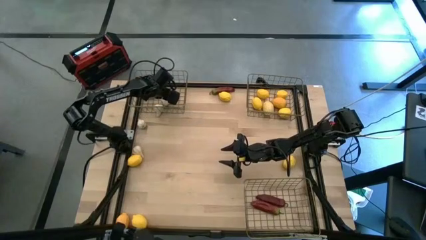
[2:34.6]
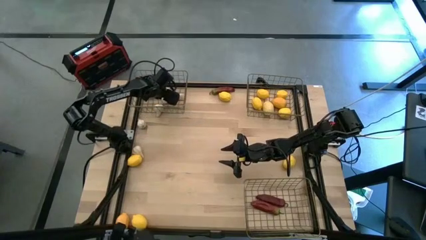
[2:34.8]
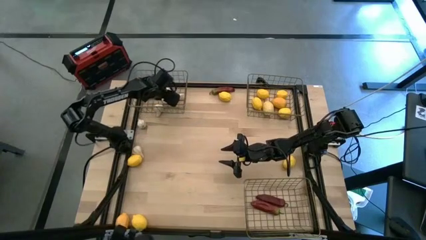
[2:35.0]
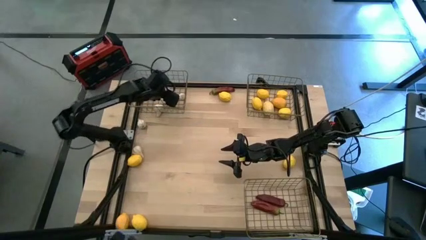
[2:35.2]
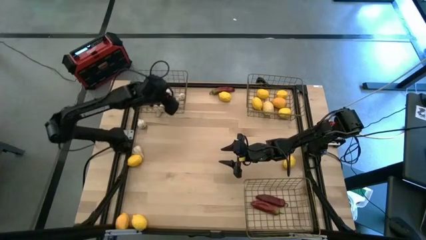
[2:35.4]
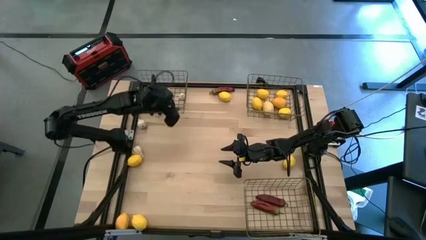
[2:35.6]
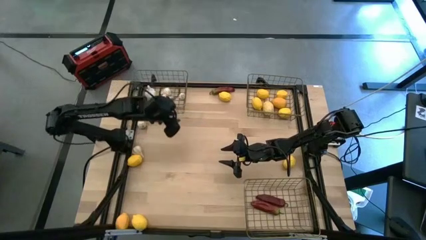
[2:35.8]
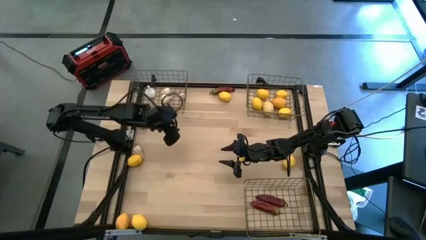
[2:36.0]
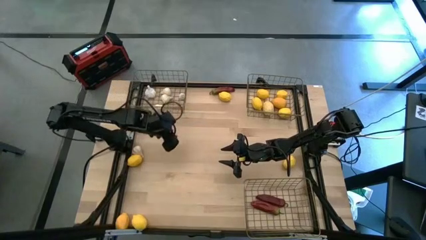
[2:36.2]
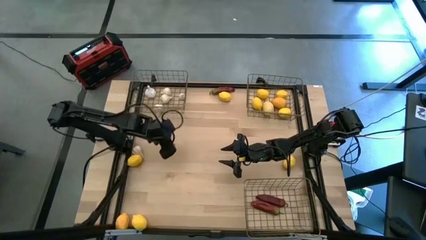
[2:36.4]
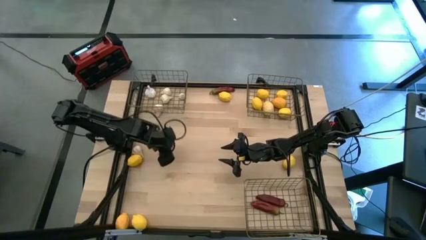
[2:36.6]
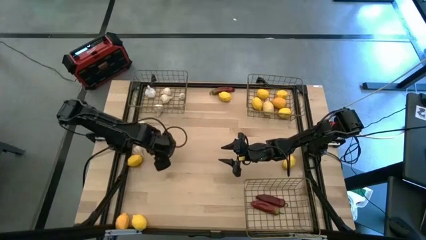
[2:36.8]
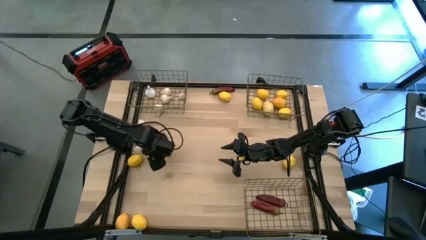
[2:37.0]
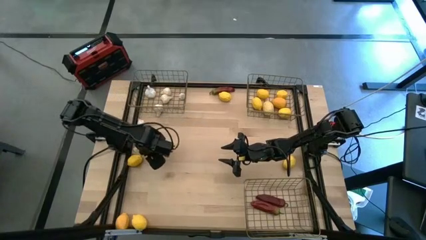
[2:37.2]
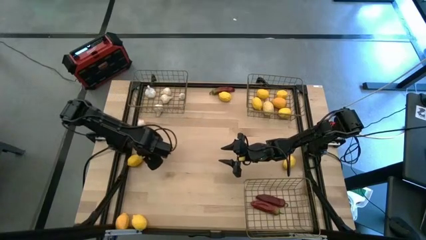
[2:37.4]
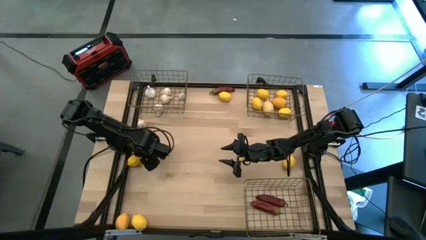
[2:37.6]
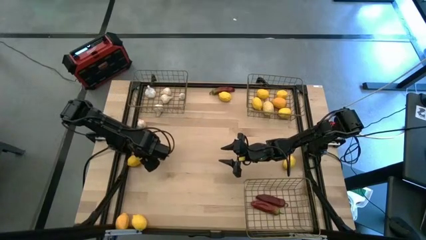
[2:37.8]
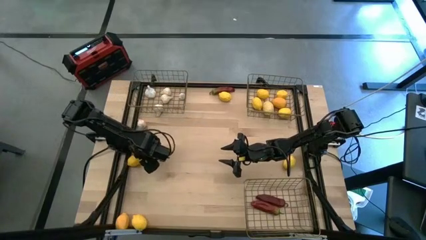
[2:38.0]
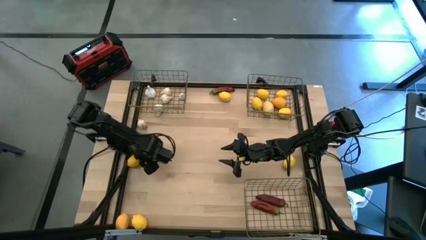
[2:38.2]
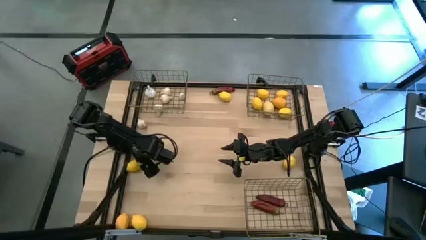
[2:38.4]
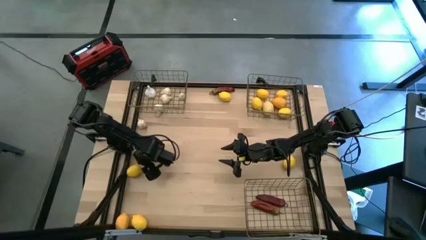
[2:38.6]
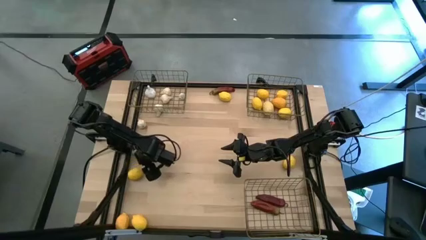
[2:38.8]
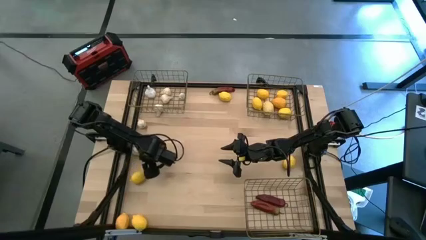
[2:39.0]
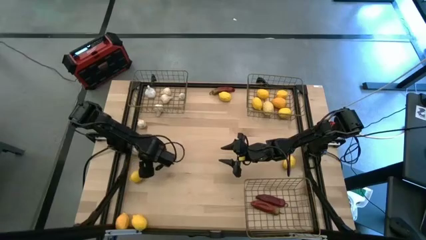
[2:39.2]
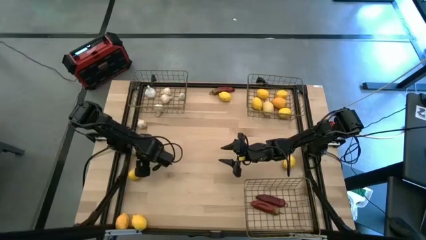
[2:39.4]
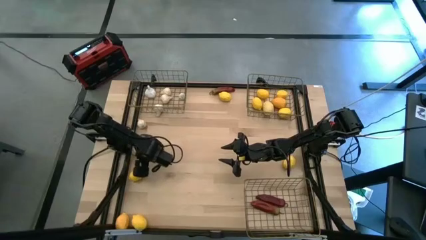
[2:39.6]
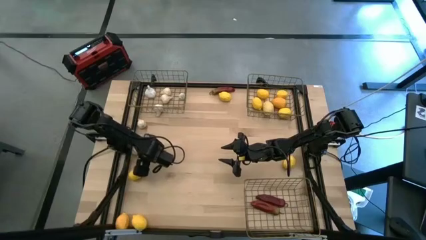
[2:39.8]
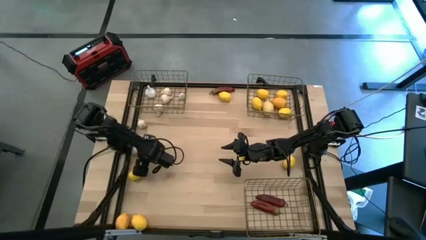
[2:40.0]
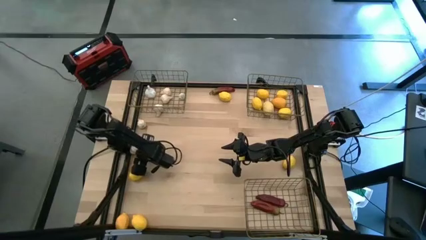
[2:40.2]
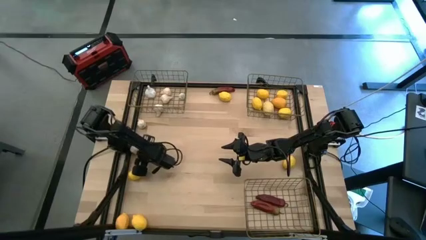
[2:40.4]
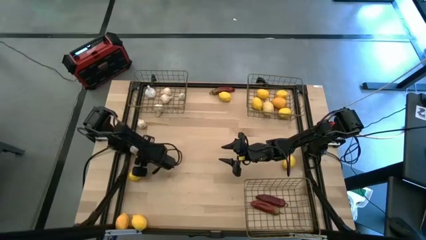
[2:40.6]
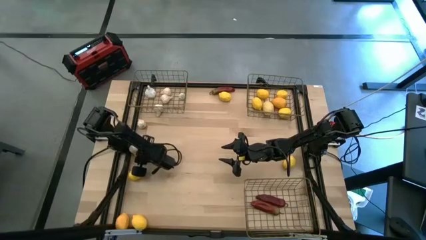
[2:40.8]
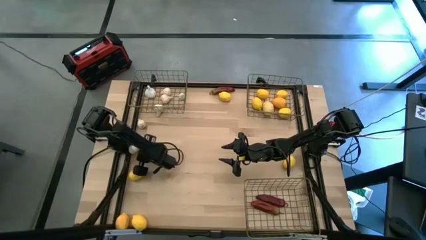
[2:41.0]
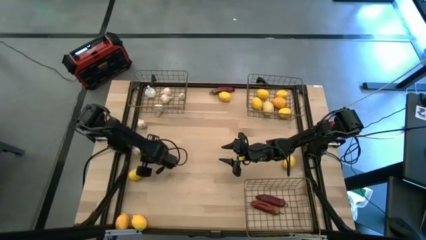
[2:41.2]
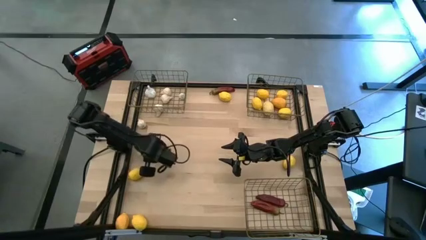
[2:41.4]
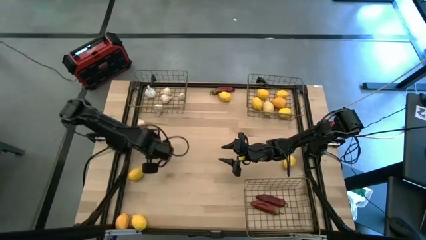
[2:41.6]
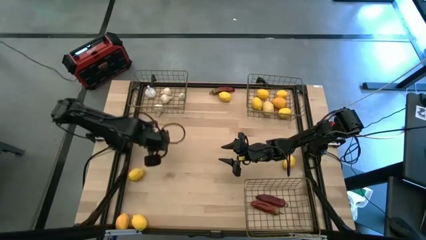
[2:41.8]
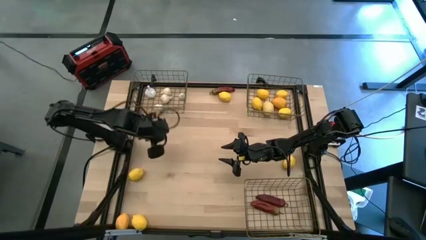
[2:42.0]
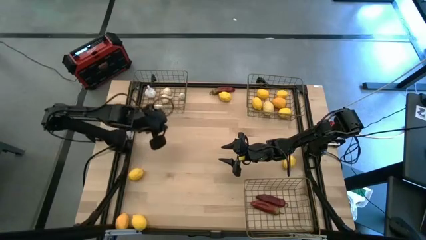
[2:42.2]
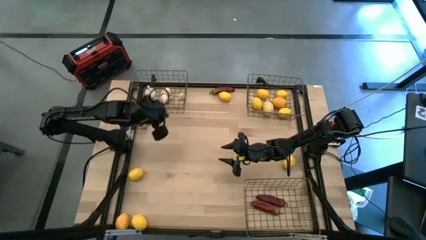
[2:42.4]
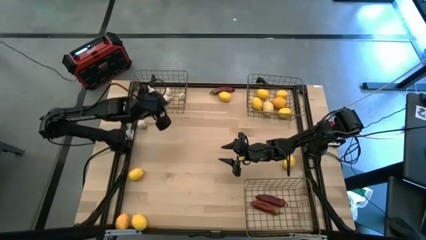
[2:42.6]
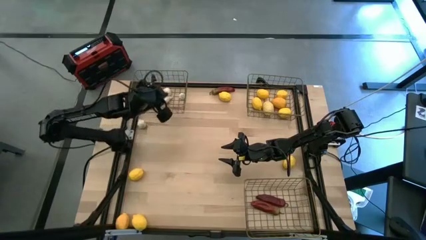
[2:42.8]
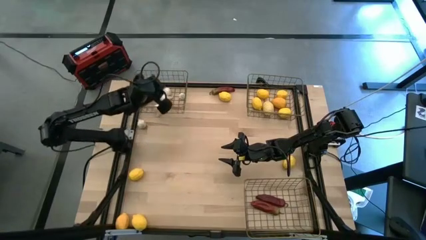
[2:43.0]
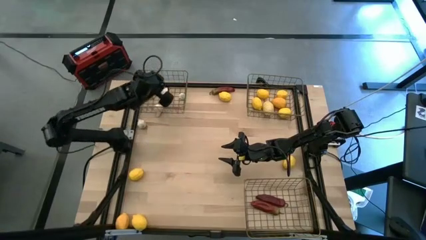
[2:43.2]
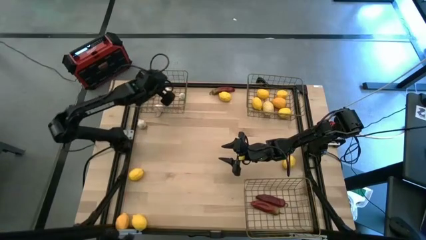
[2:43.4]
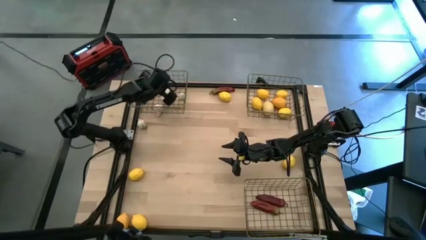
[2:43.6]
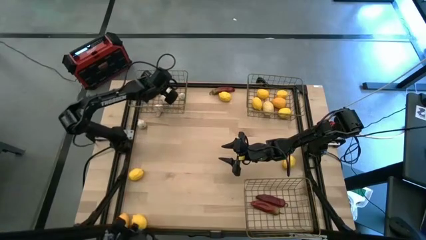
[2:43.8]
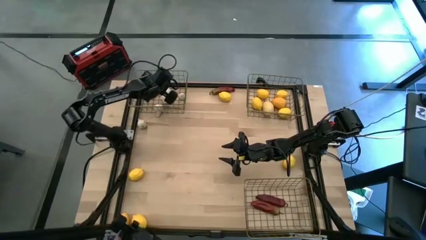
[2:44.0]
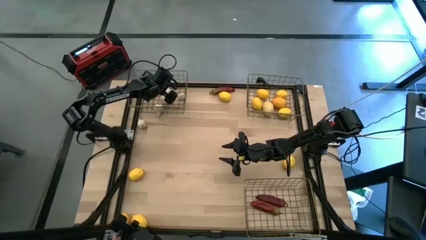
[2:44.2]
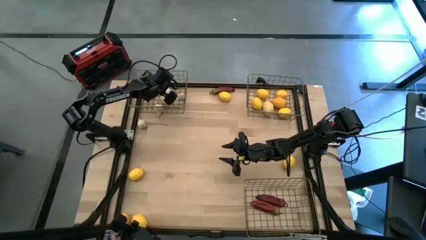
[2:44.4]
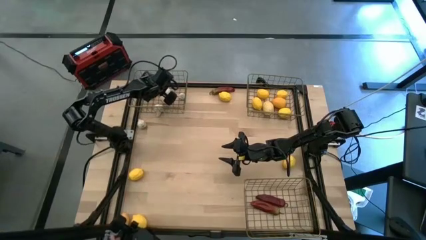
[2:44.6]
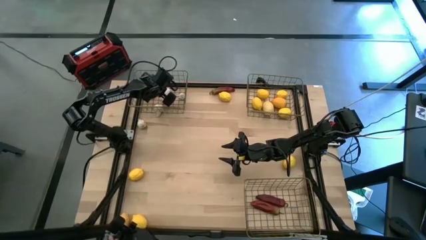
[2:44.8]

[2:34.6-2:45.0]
Task: Sort produce into baskets
Put the white garlic into the top left wire basket

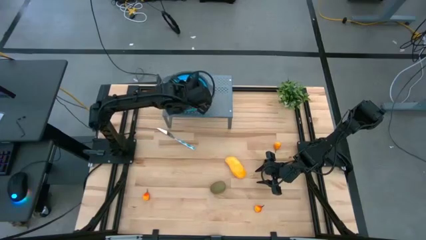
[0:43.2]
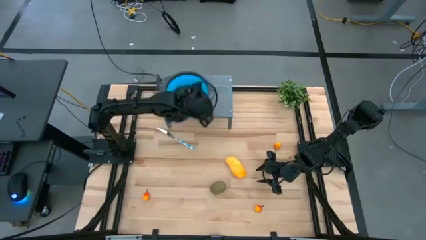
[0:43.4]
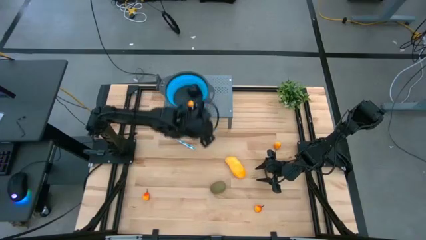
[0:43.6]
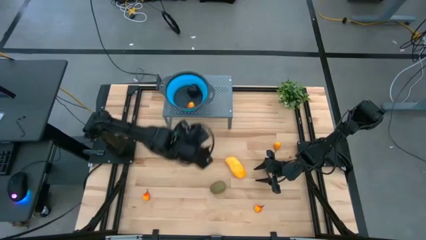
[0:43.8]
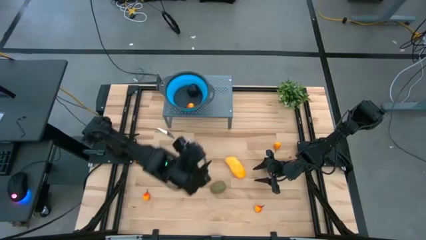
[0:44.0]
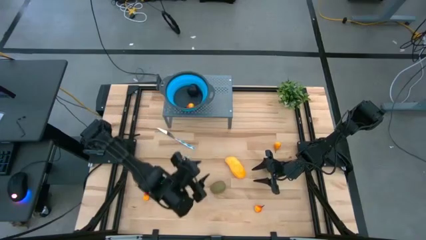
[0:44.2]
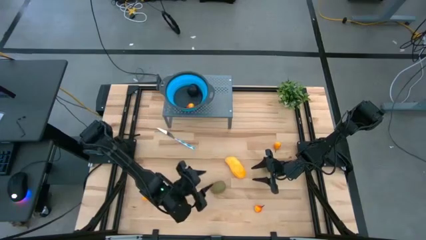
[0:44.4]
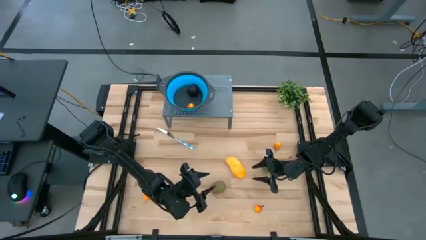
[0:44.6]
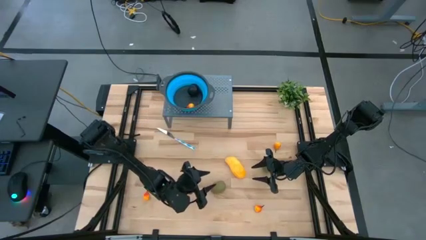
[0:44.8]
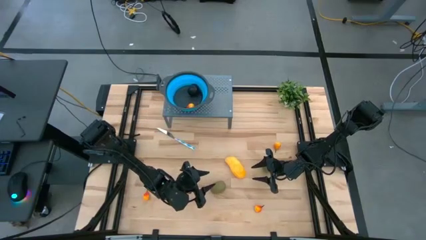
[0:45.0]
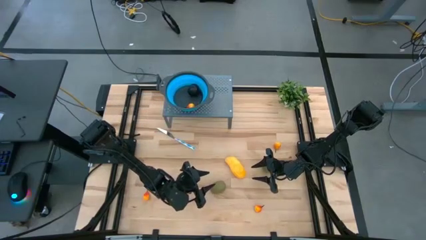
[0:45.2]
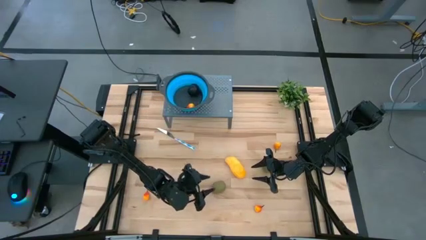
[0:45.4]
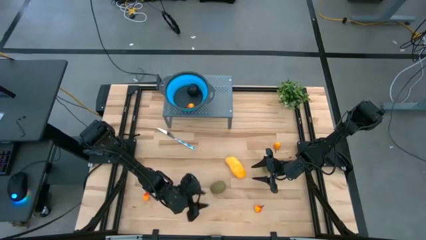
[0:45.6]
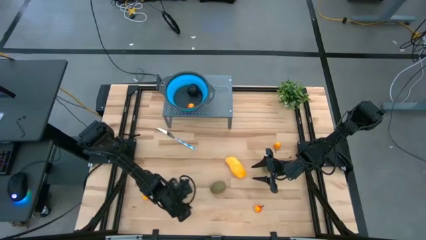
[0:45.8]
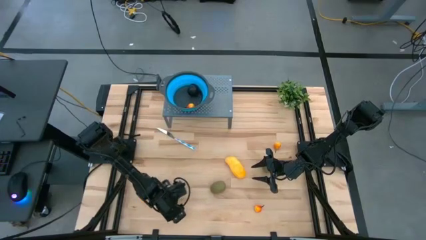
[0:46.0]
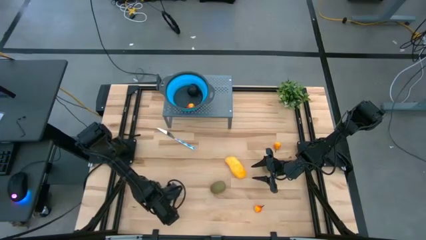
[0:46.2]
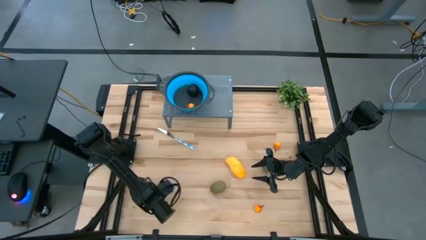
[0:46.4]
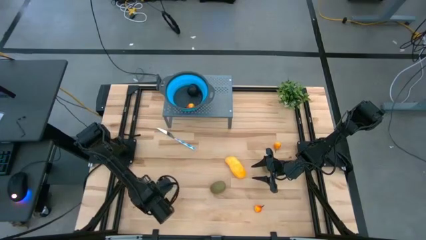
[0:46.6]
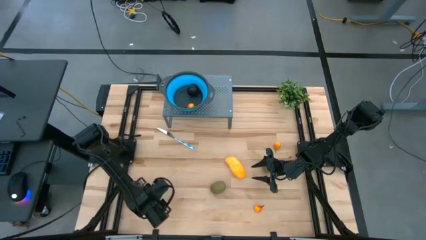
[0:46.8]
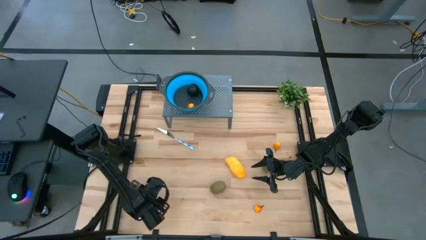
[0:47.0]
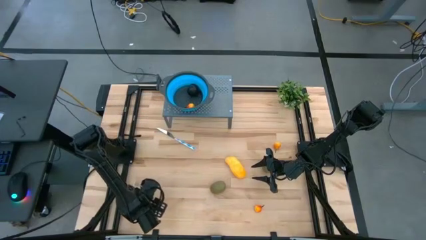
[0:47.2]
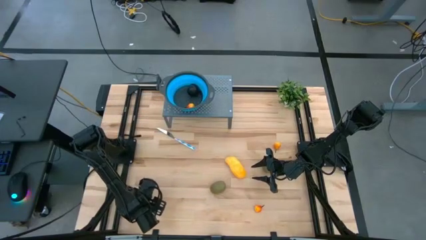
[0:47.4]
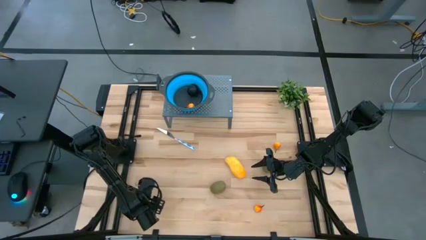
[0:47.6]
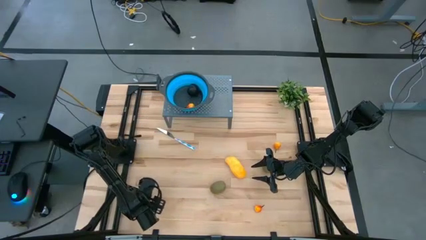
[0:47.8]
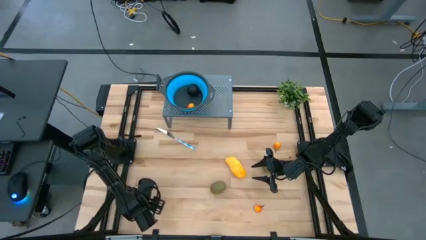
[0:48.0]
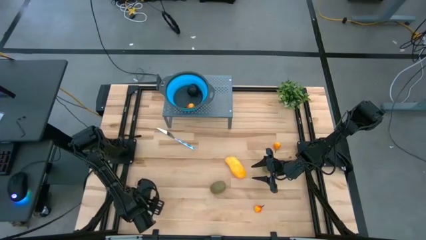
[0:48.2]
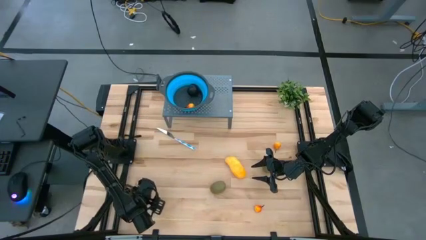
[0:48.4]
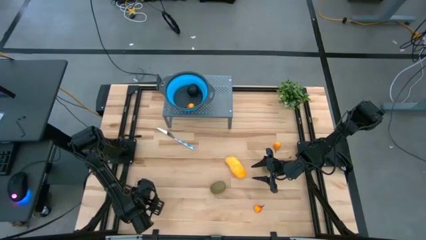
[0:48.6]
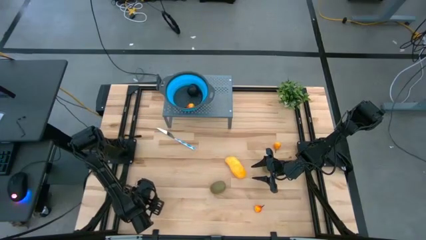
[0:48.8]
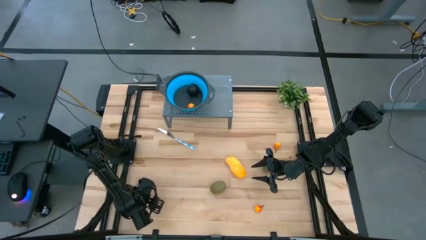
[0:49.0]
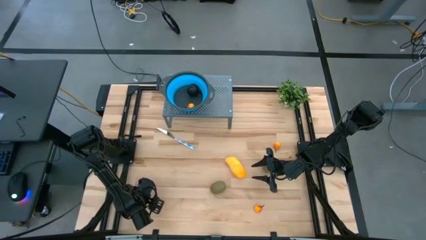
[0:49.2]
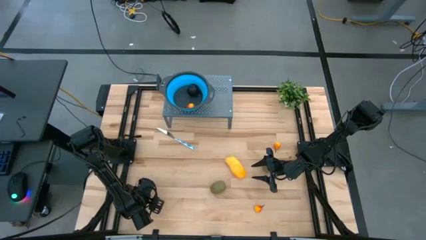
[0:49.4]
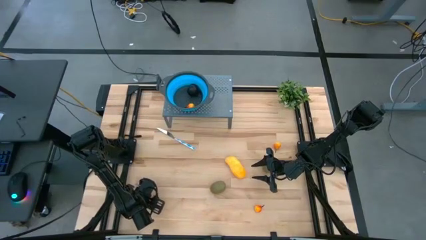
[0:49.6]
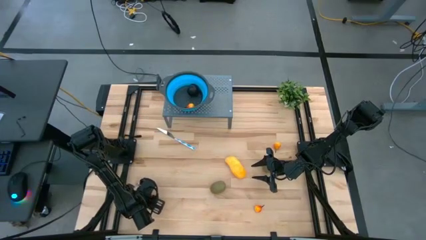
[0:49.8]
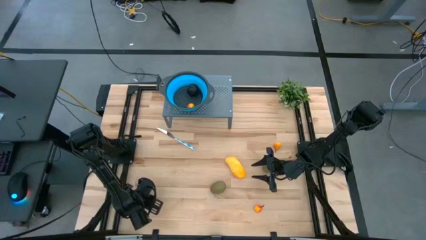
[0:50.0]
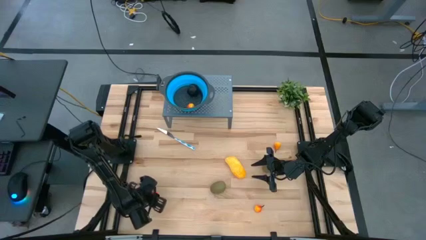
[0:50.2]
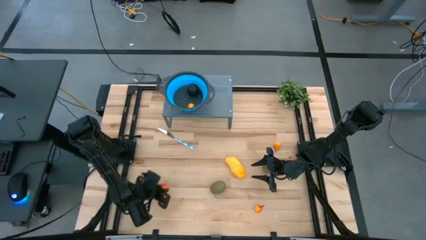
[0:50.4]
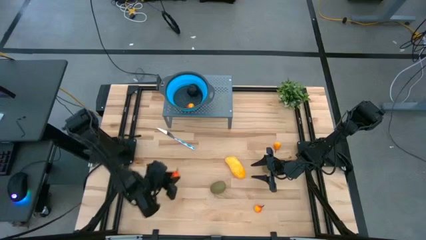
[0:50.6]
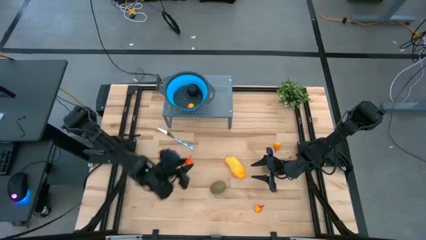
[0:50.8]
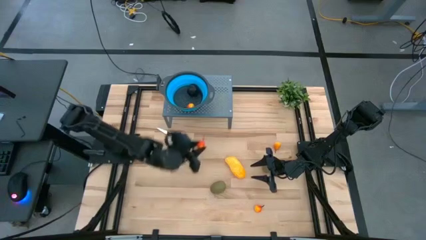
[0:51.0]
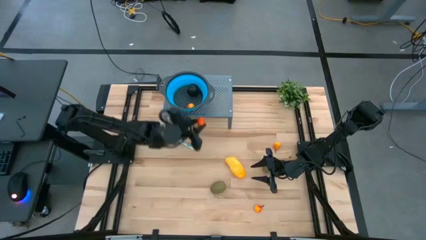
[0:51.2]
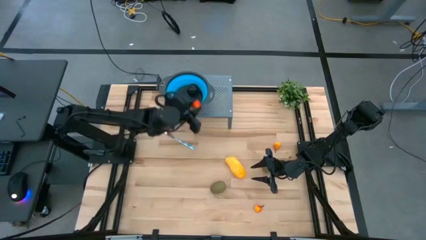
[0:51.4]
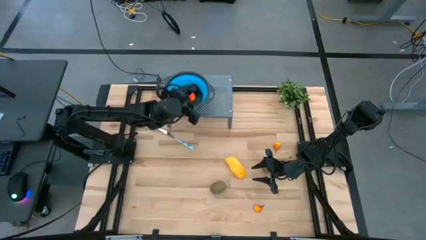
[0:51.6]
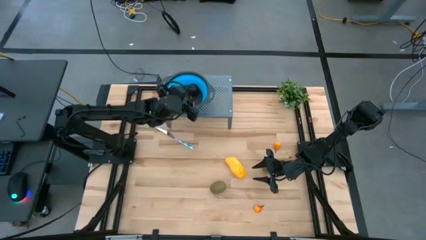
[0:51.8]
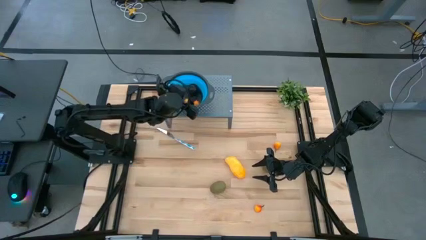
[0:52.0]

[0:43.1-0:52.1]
Task: Pick & Place Fruit
Put the pear into the blue strainer bowl
